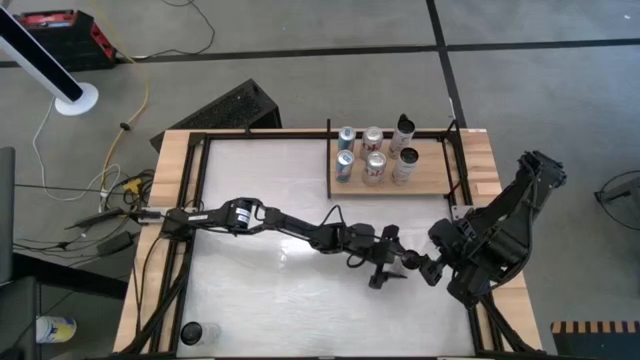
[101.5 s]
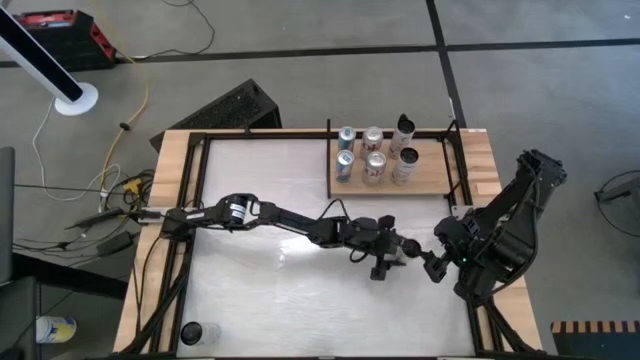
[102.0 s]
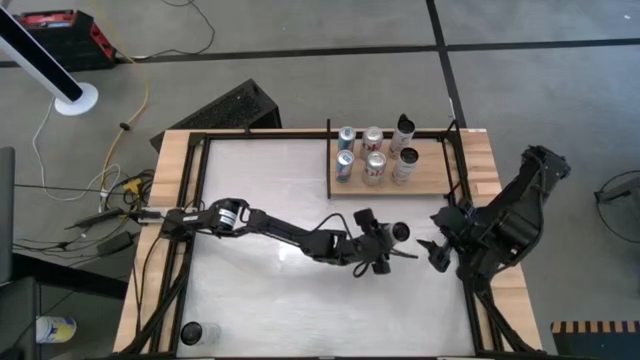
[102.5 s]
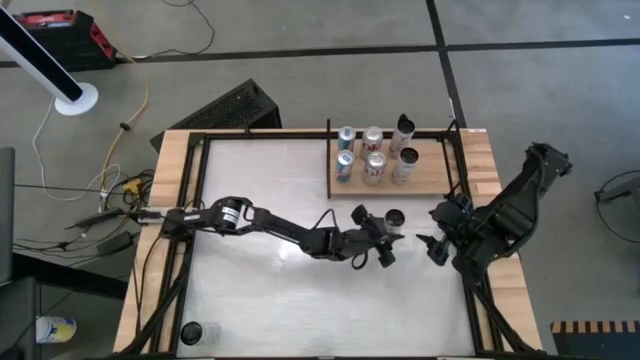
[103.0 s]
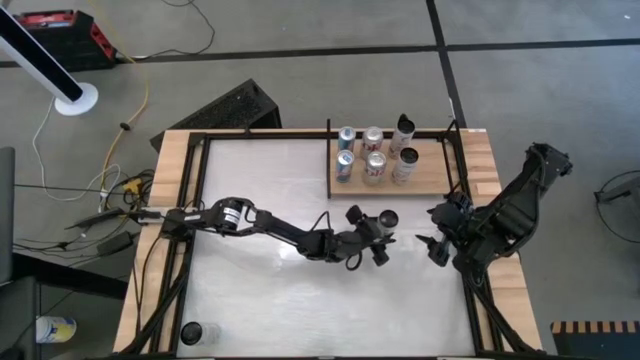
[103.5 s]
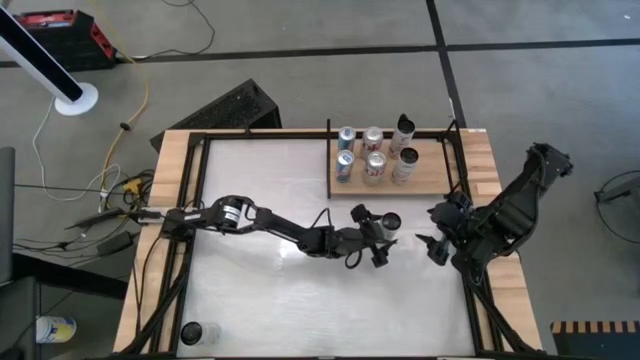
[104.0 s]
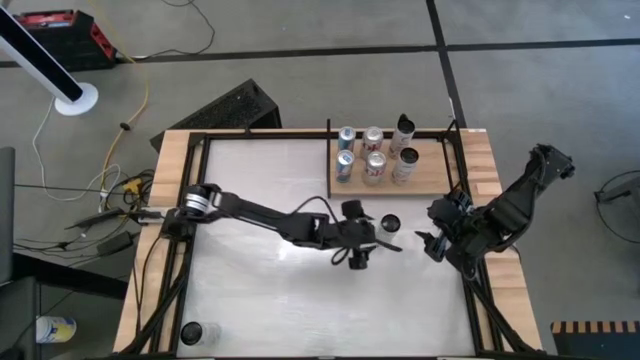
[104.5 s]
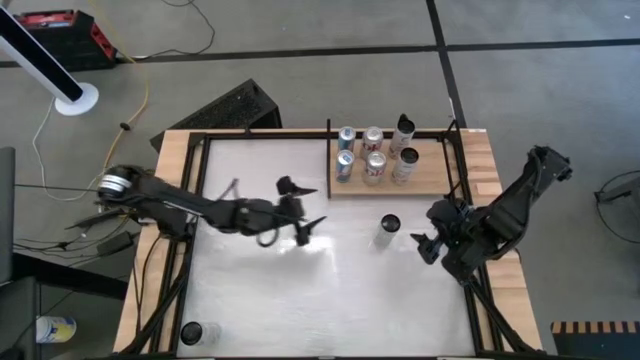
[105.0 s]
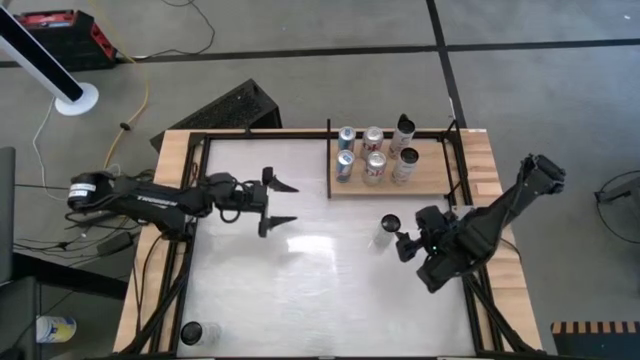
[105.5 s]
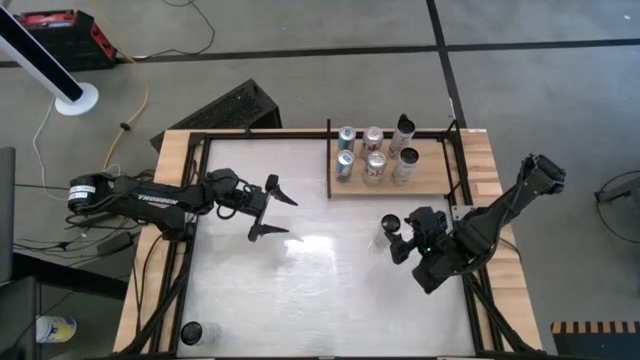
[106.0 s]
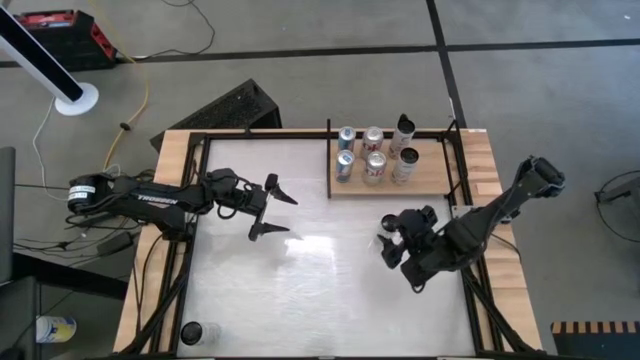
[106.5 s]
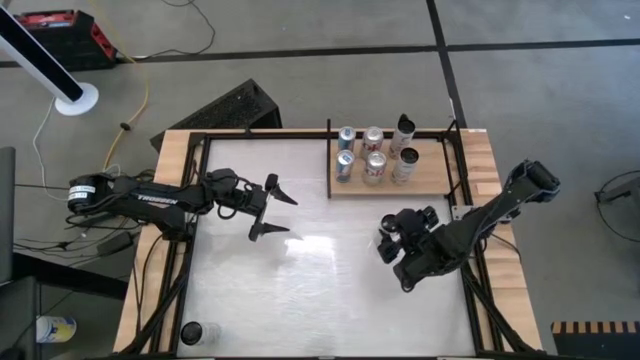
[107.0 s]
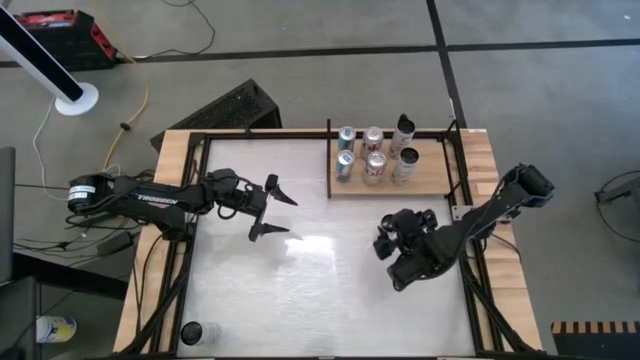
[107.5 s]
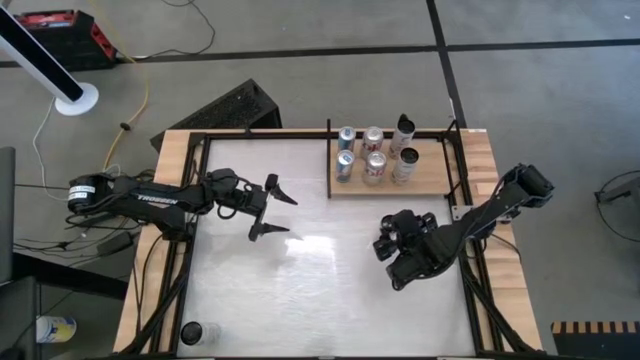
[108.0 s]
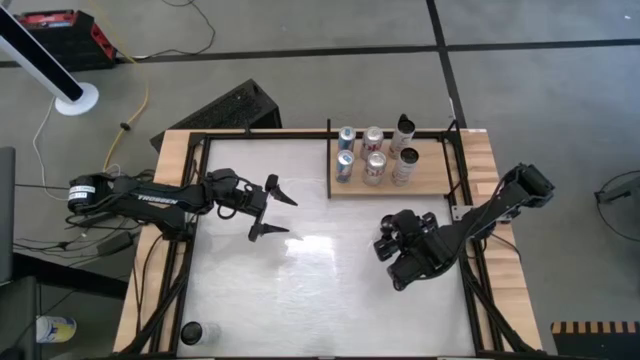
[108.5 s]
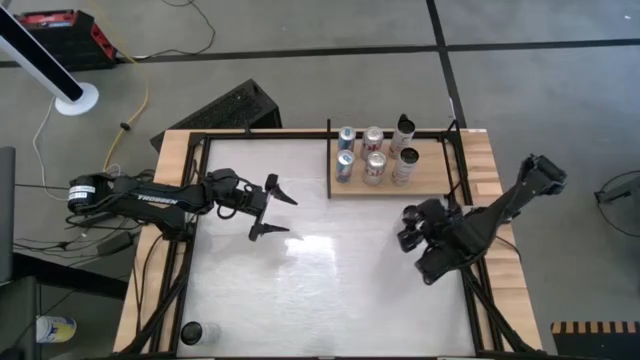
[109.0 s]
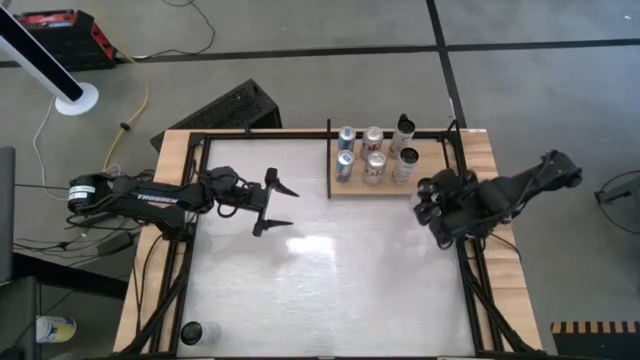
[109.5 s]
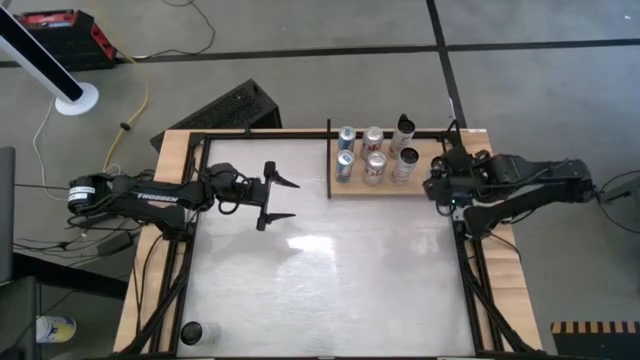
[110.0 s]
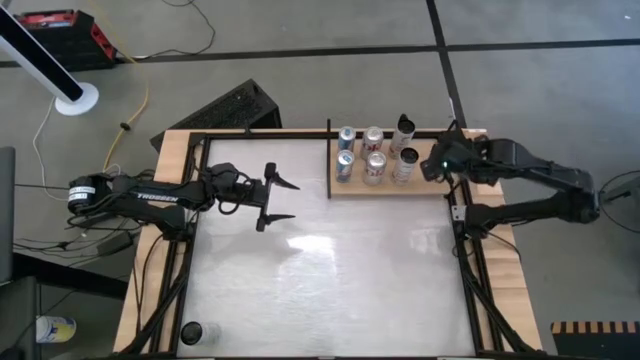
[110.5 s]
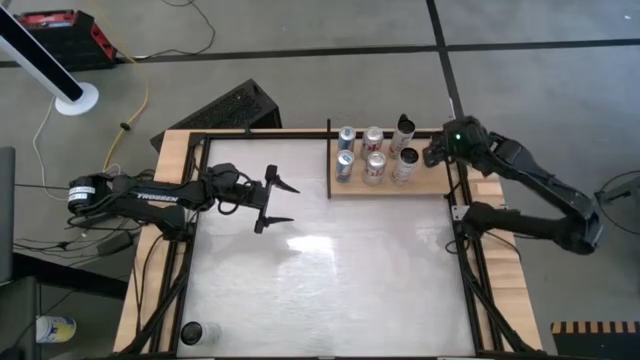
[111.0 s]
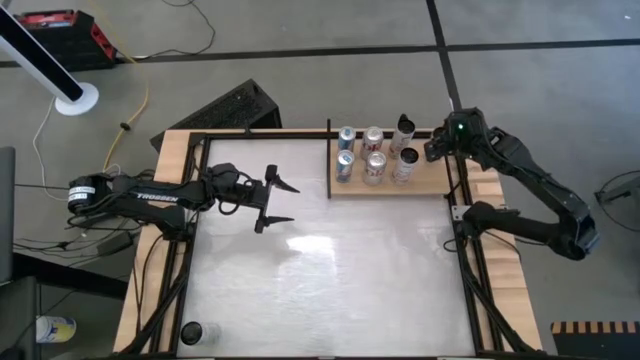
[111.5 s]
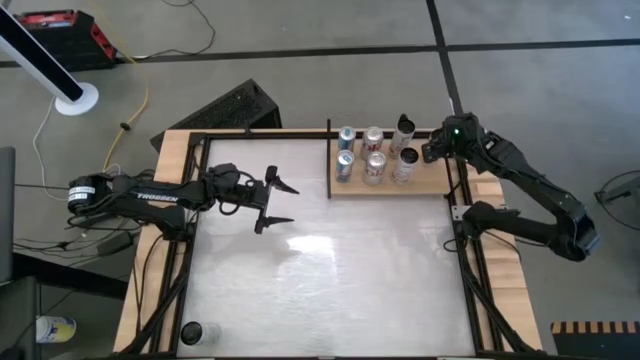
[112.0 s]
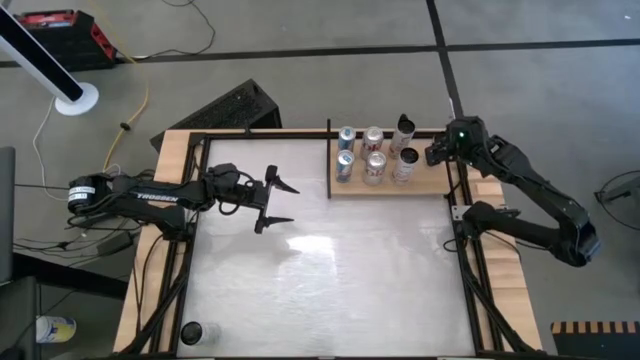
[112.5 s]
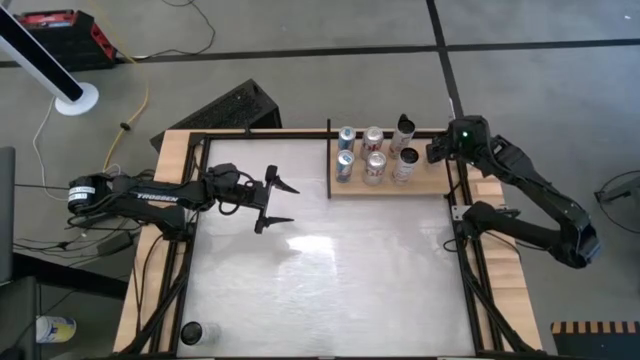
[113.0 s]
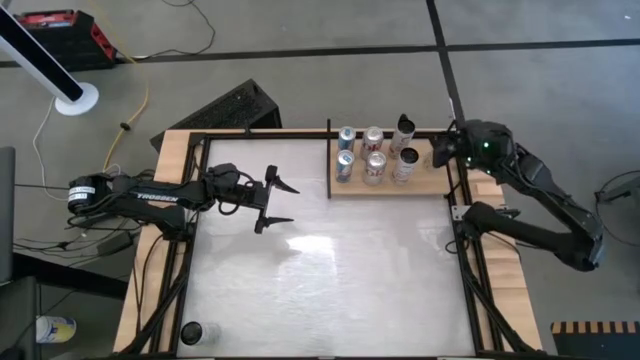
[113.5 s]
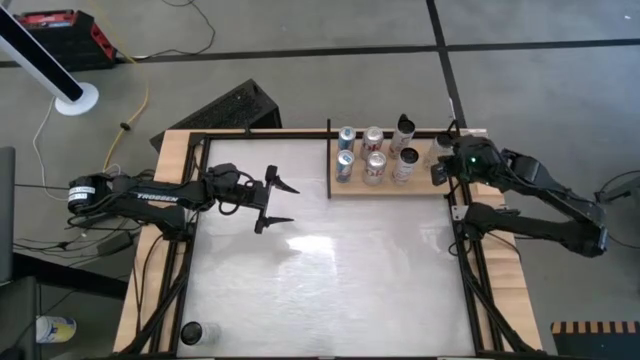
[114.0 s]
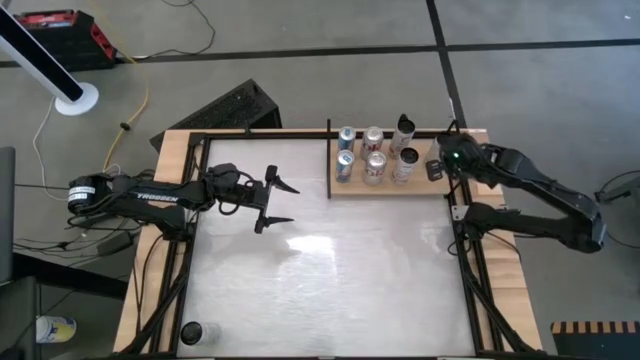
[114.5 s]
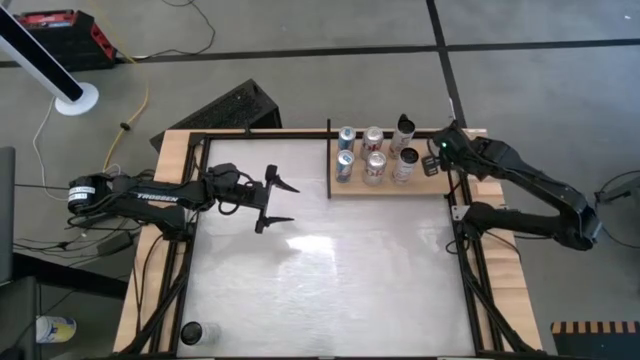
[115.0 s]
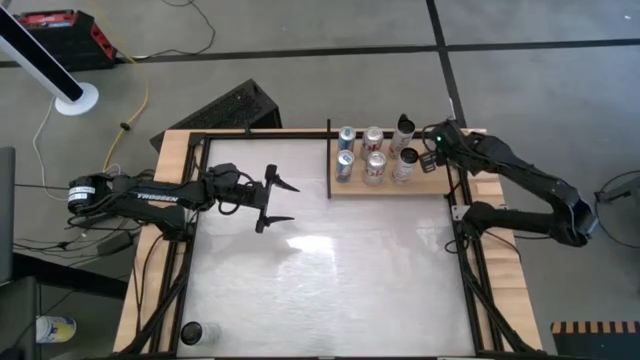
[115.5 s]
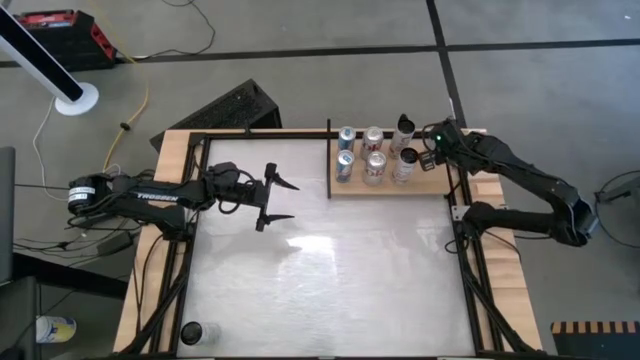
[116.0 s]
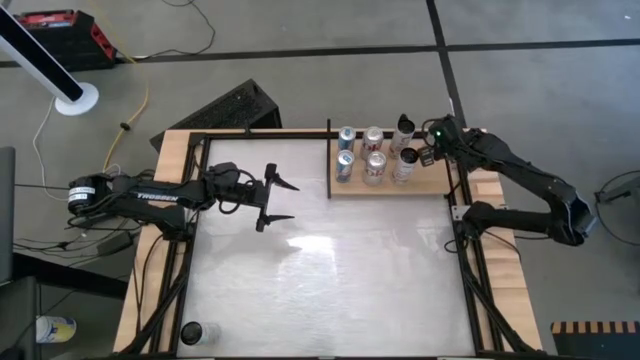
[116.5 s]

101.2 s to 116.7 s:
Task: Place canned beverage on shelf
Put the right white-yellow soda can

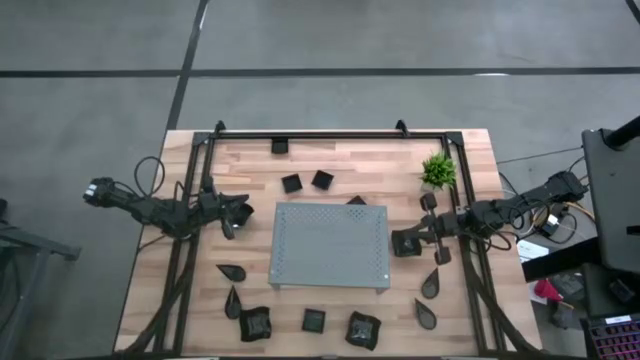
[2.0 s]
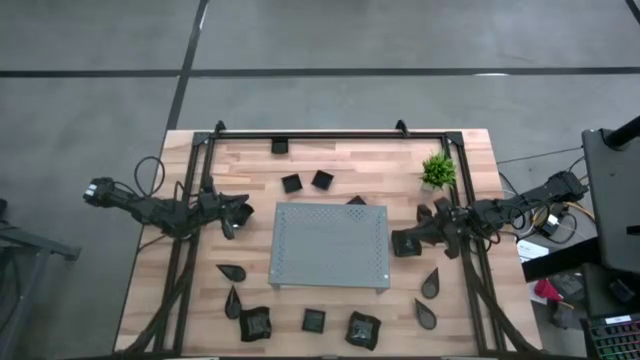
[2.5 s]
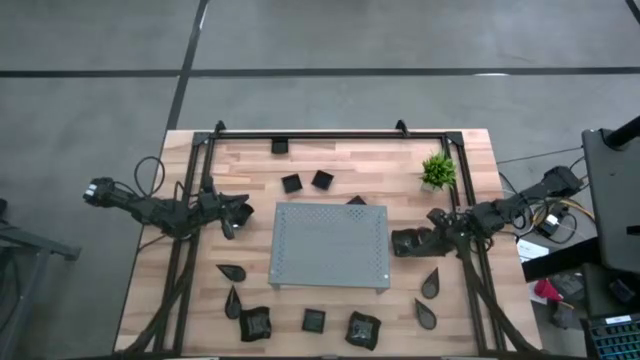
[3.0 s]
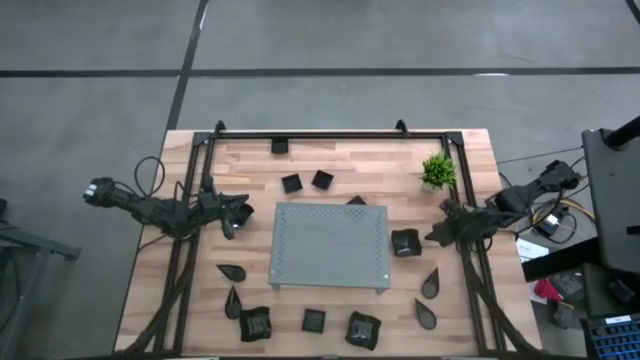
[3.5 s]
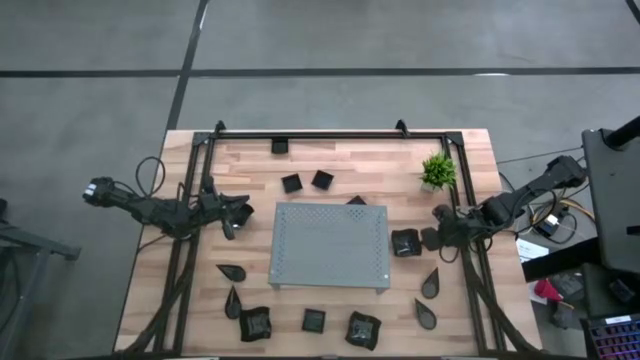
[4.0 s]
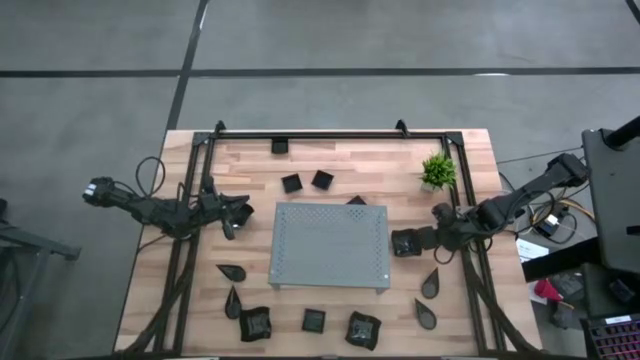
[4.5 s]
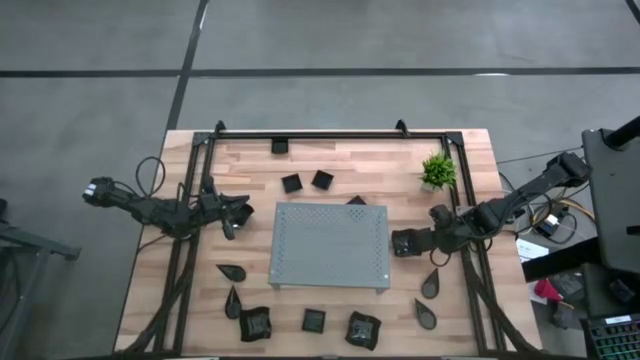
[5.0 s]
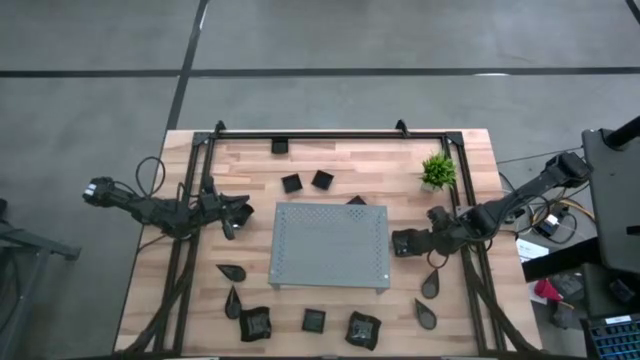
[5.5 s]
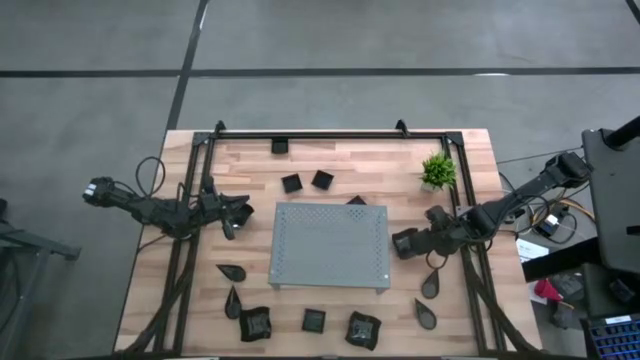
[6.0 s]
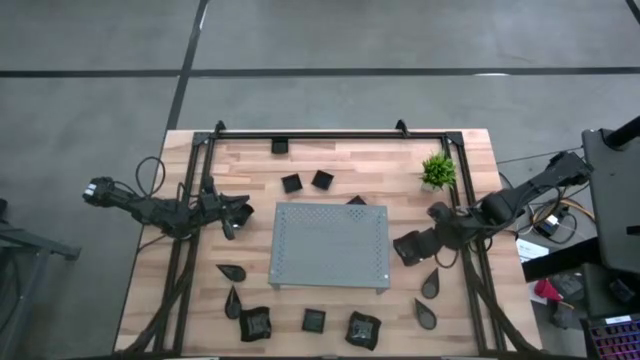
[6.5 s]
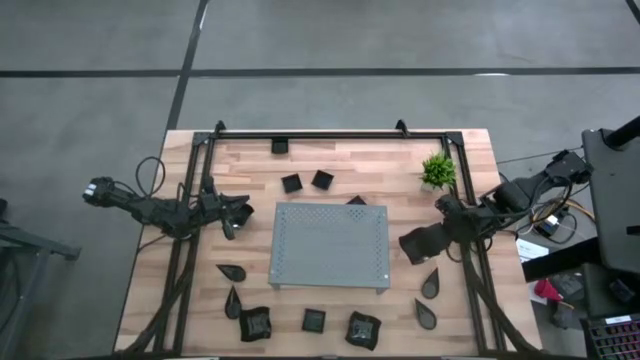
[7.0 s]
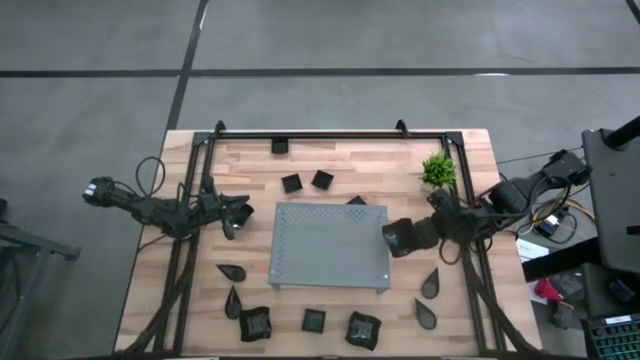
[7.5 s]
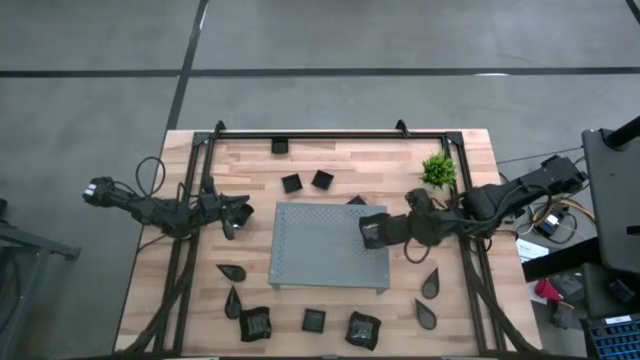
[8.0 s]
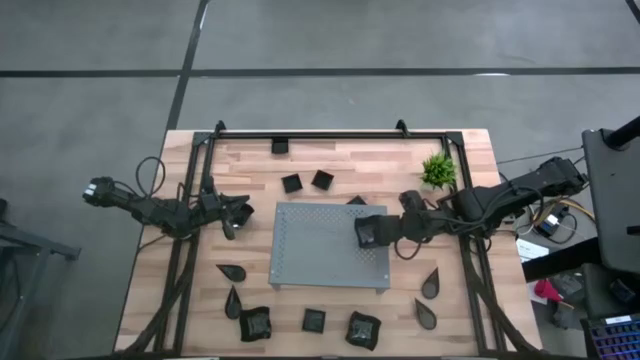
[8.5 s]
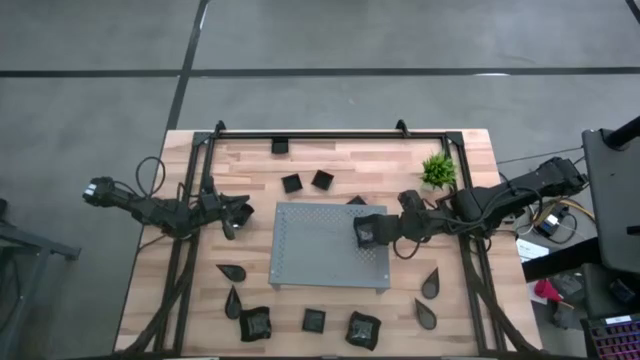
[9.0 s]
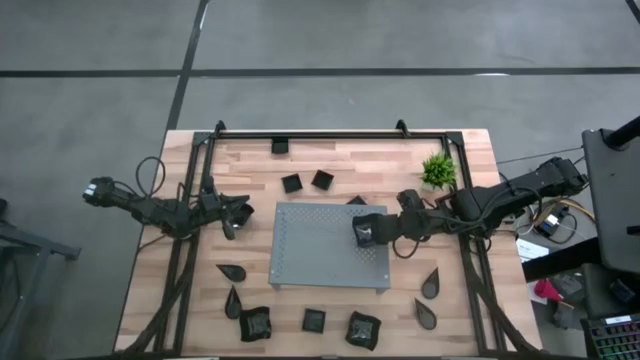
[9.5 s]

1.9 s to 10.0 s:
Task: Pick & Place Mini shaped plates
Put the top right black distorted square plate on the shelf
